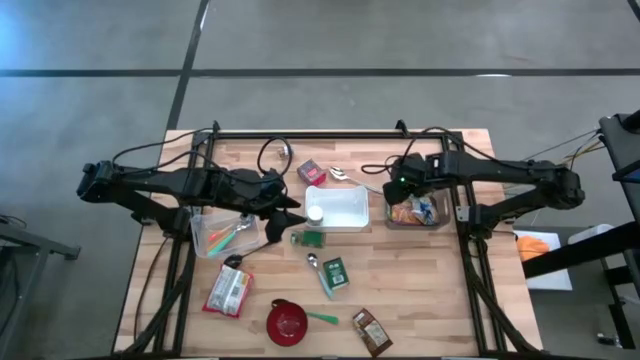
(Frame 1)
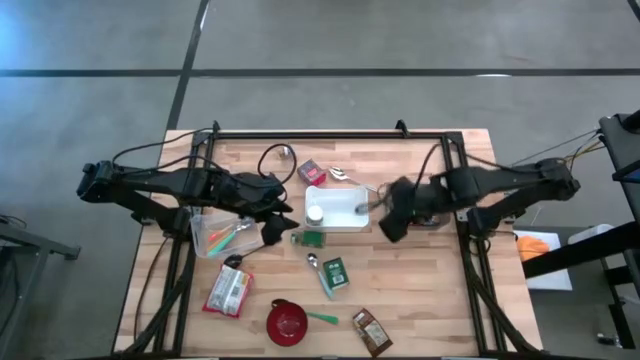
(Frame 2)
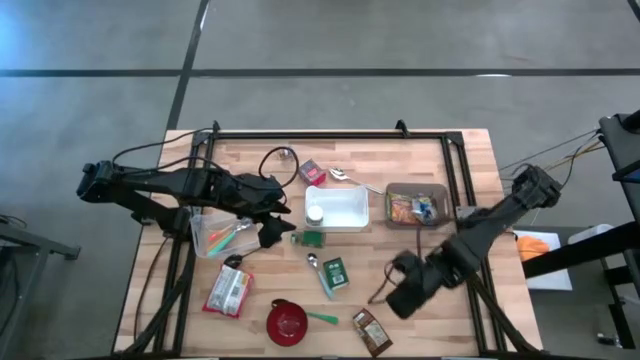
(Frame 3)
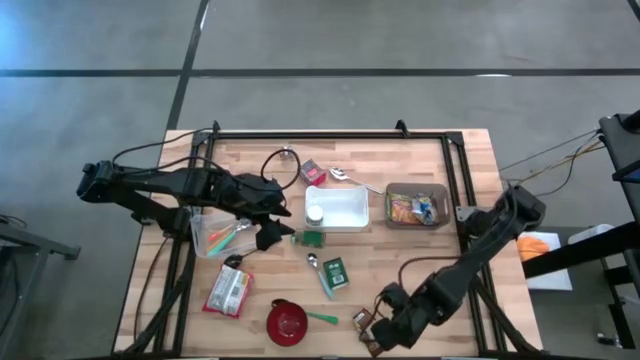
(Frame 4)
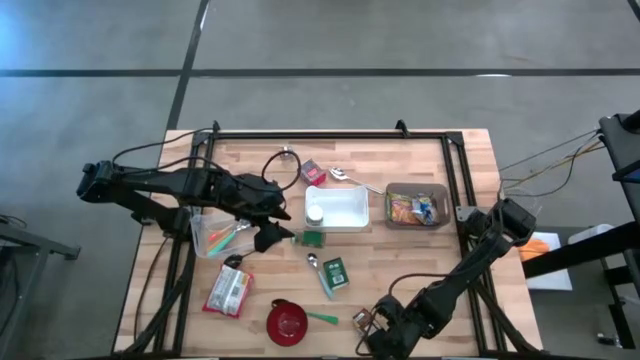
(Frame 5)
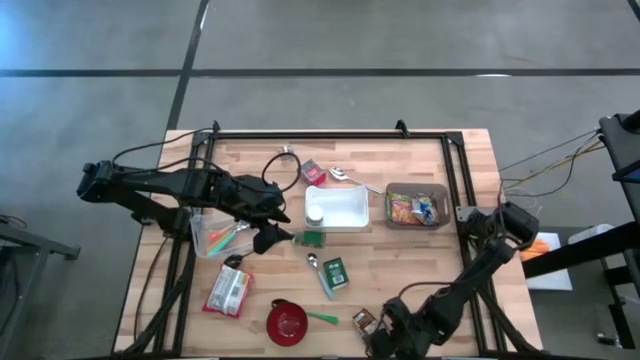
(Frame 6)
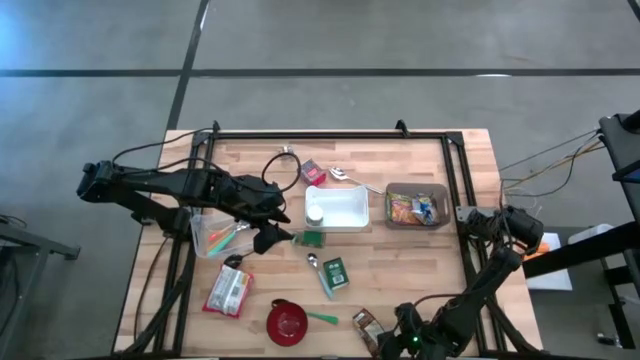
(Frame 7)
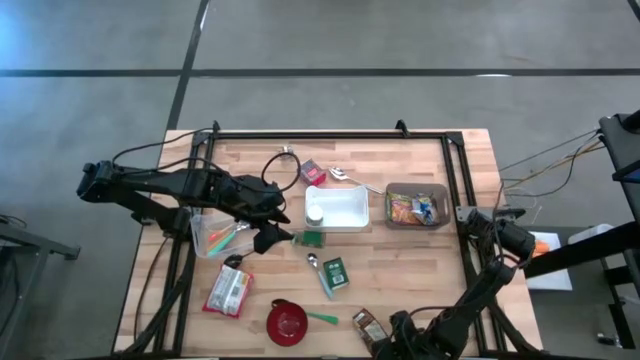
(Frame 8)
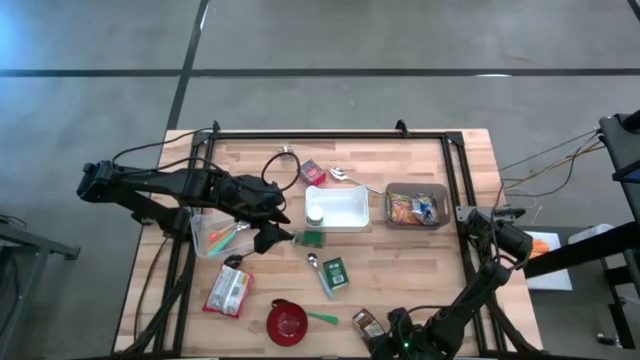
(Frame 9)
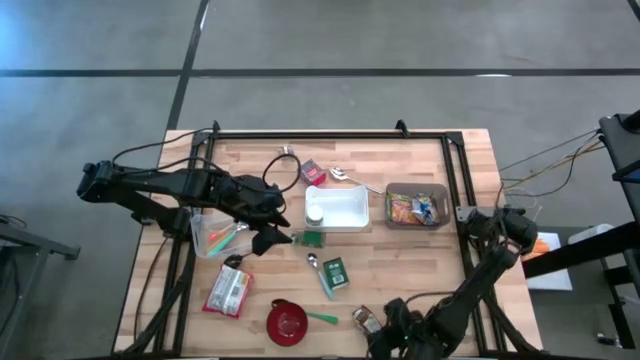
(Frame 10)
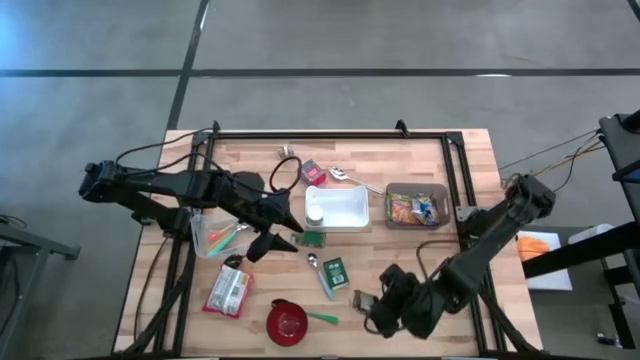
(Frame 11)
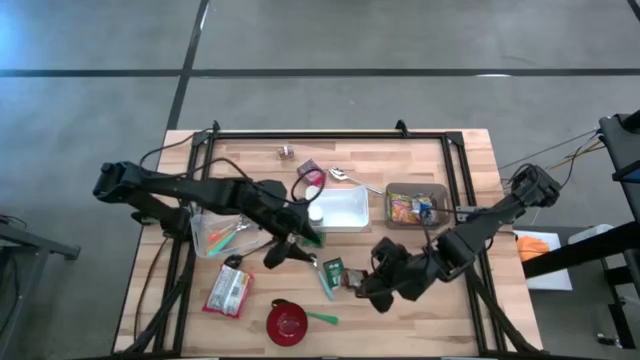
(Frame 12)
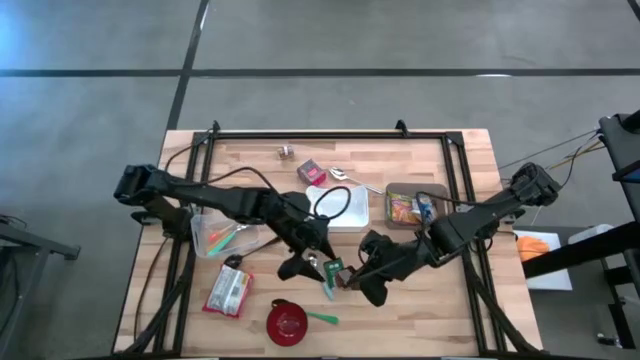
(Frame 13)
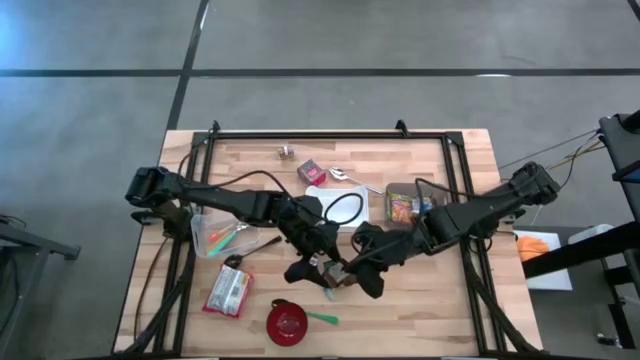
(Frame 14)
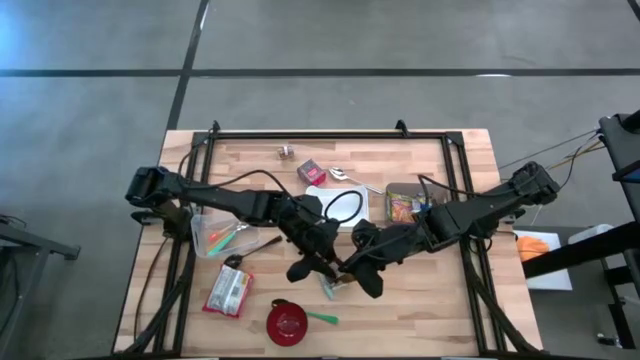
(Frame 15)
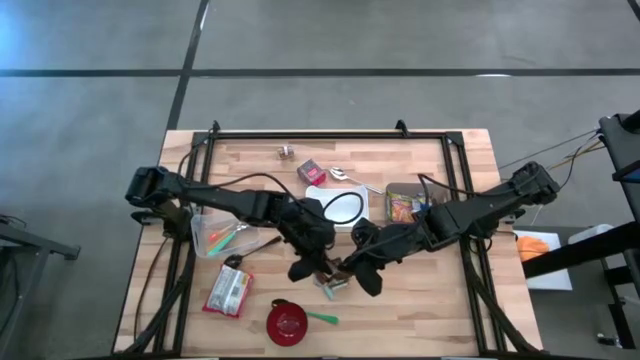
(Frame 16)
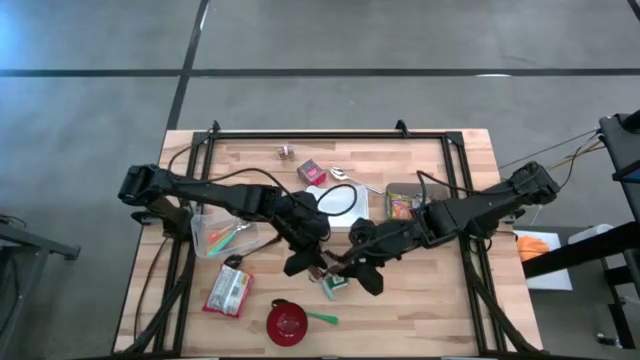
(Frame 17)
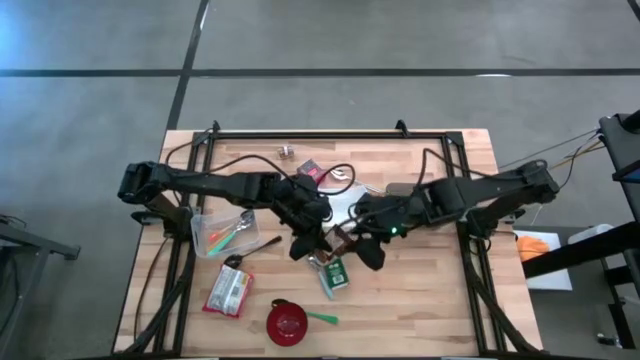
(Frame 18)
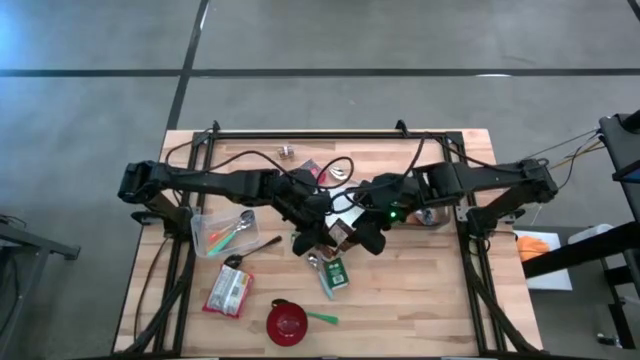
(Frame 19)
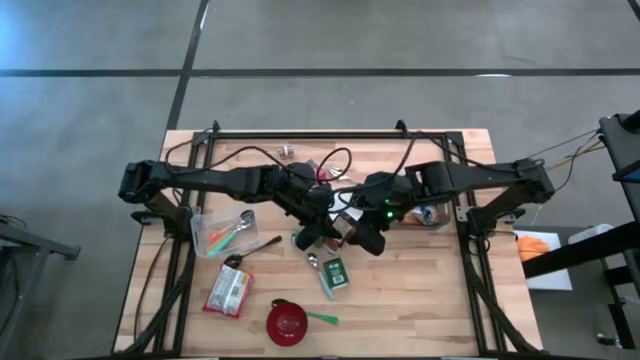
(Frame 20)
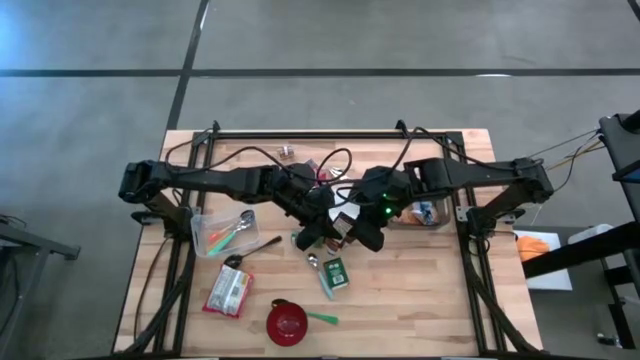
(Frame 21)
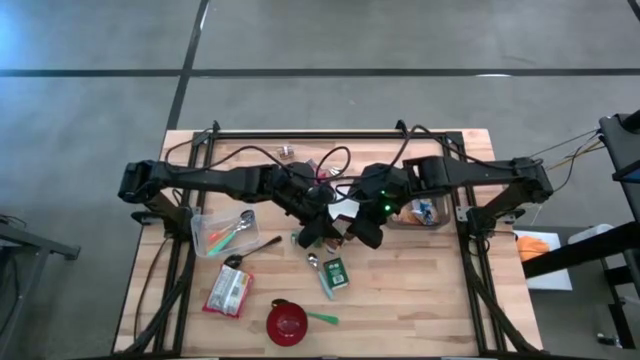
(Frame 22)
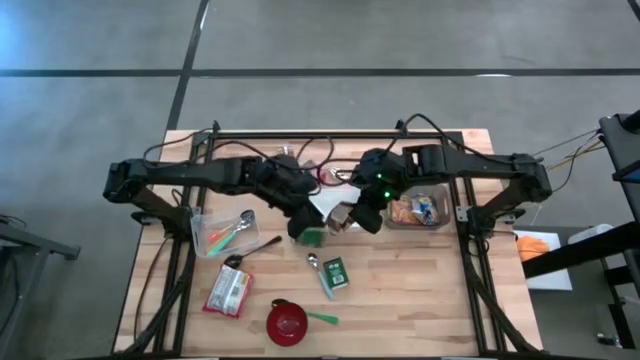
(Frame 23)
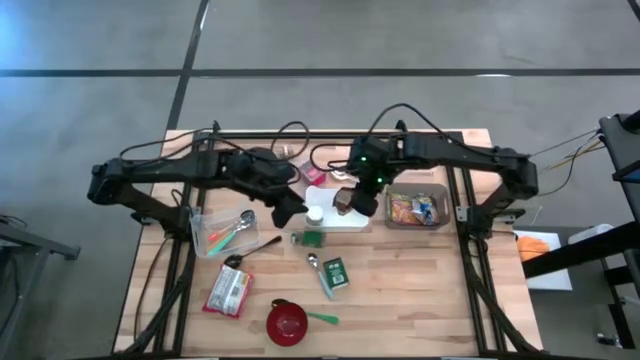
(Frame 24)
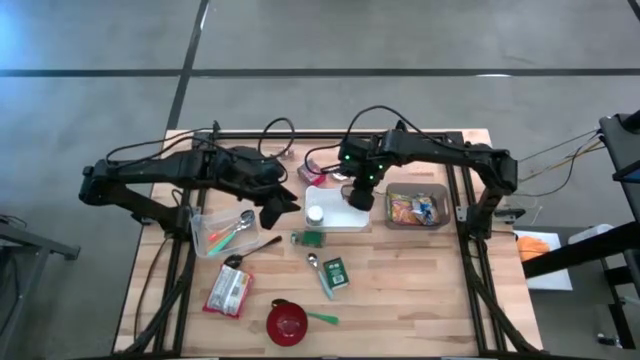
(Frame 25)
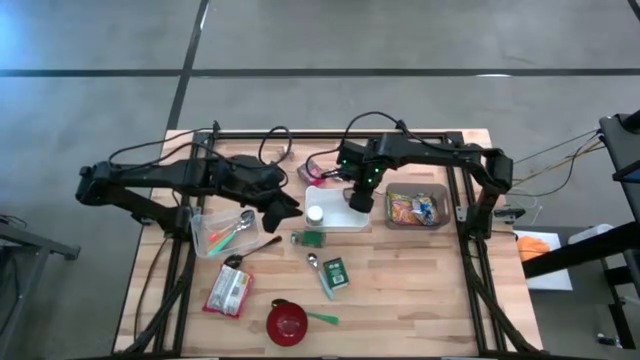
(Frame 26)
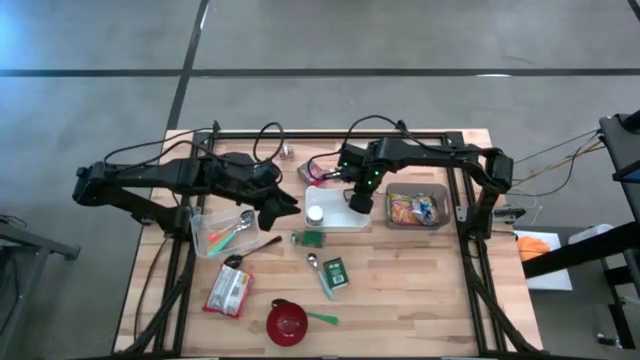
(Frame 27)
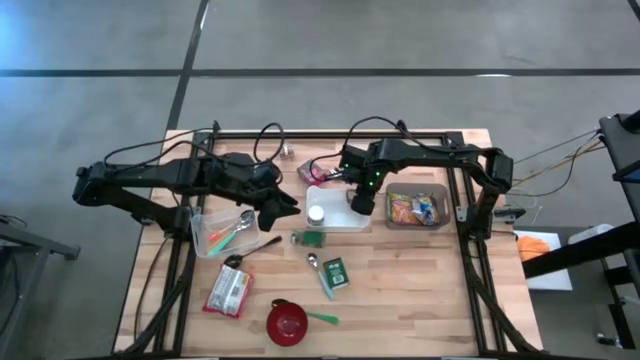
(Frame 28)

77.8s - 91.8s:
Put the orange seasoning pack into the white bin
